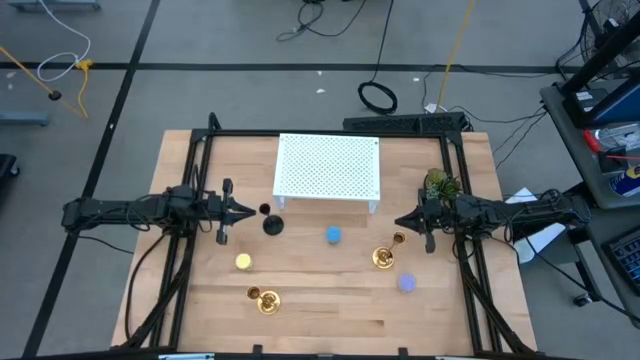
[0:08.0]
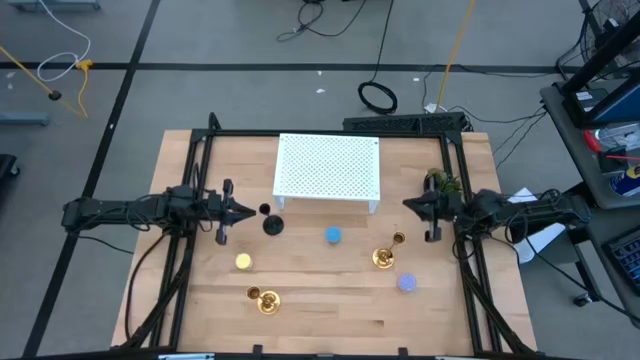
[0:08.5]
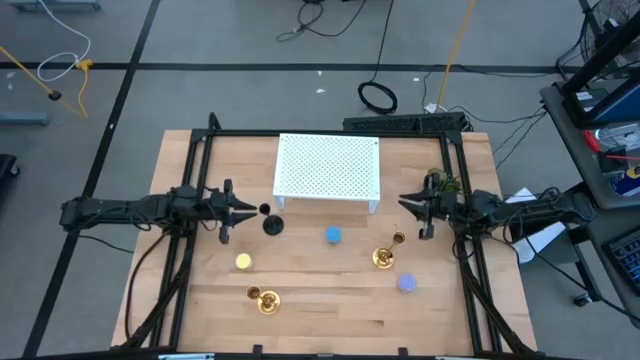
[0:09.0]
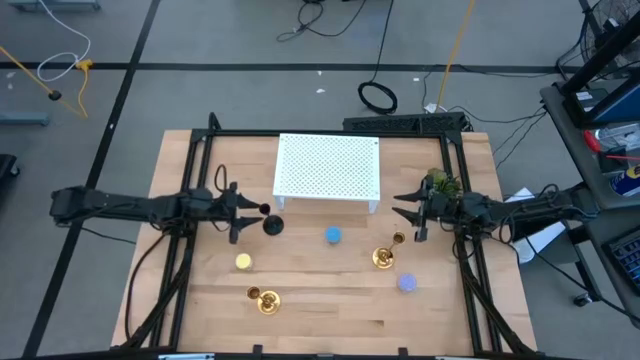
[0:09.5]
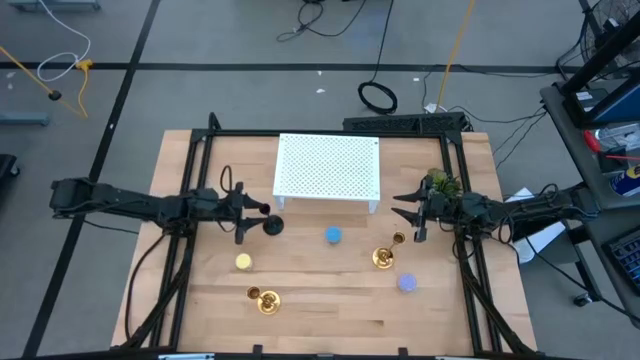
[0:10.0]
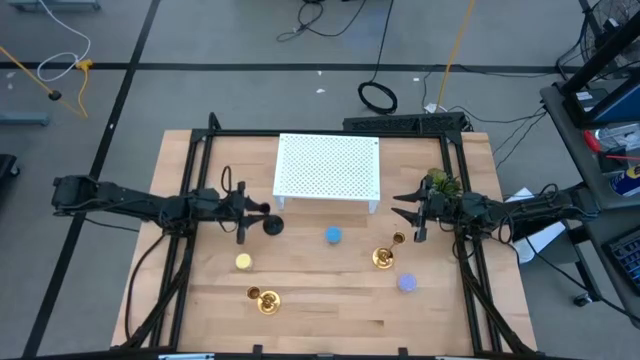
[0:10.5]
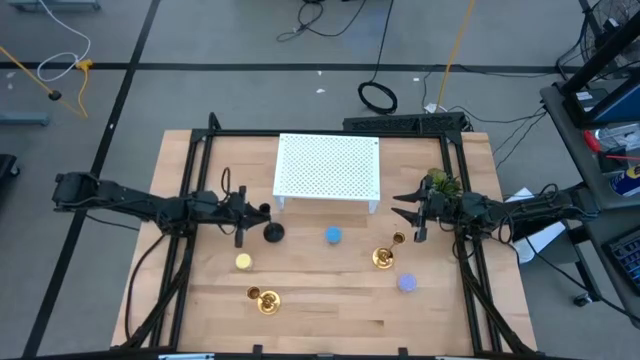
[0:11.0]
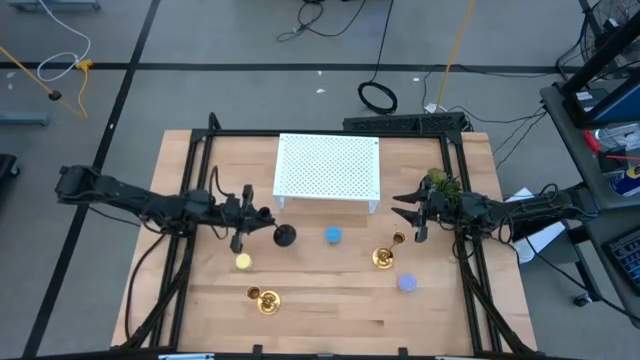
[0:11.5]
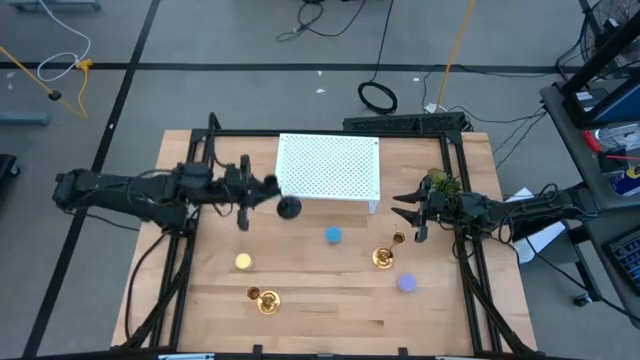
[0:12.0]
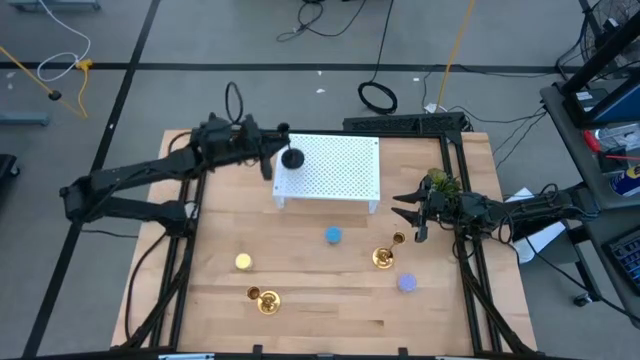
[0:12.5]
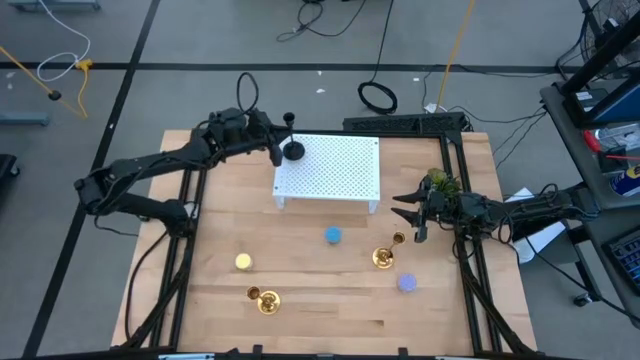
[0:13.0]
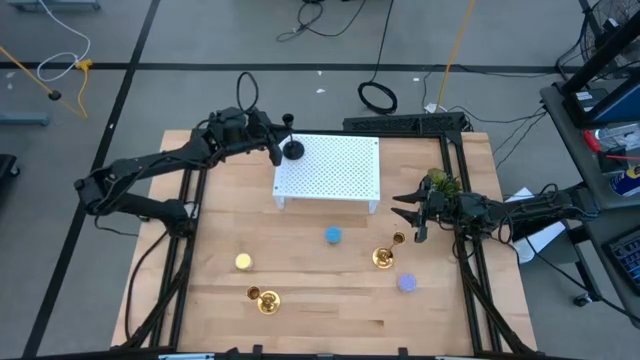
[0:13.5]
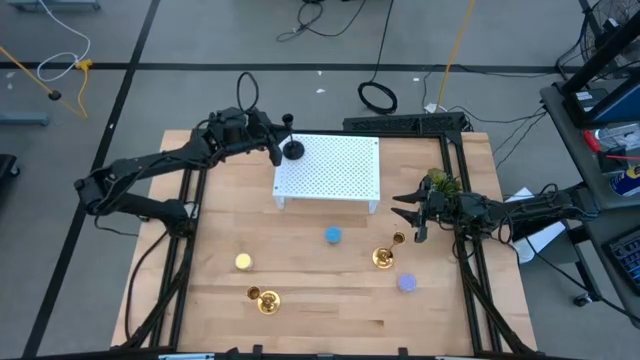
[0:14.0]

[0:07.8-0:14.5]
Task: Pick & Place candle stick holders
Put the black candle holder on the shelf

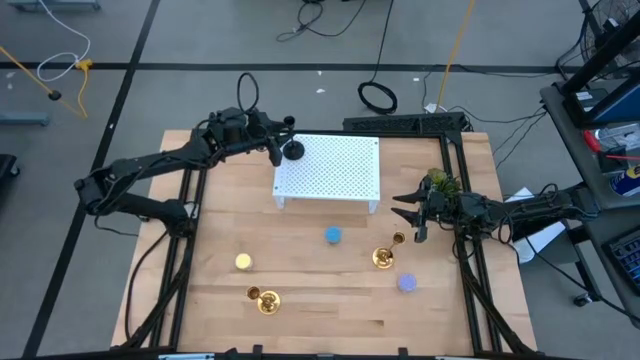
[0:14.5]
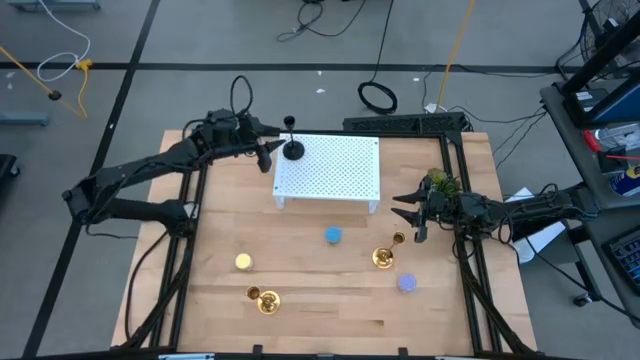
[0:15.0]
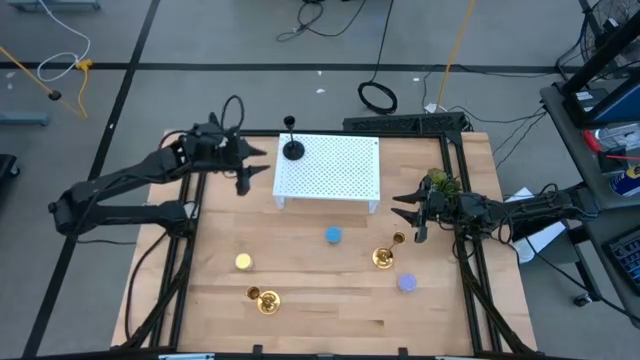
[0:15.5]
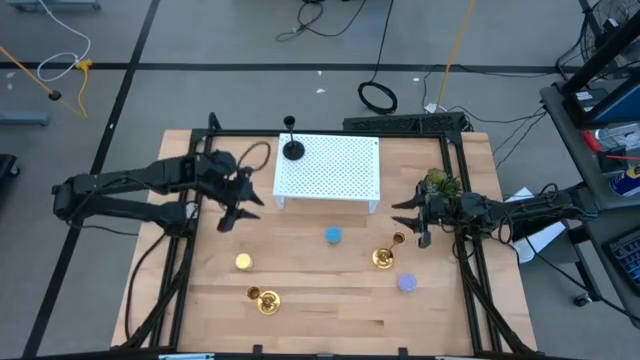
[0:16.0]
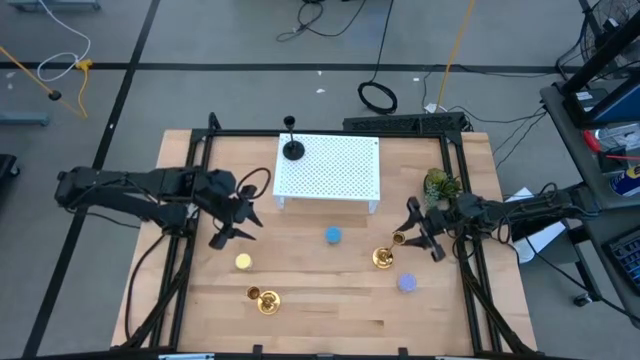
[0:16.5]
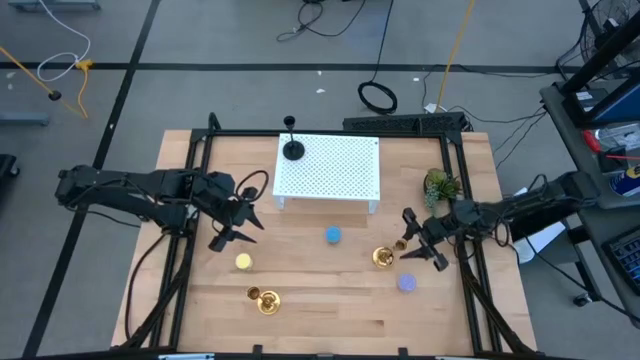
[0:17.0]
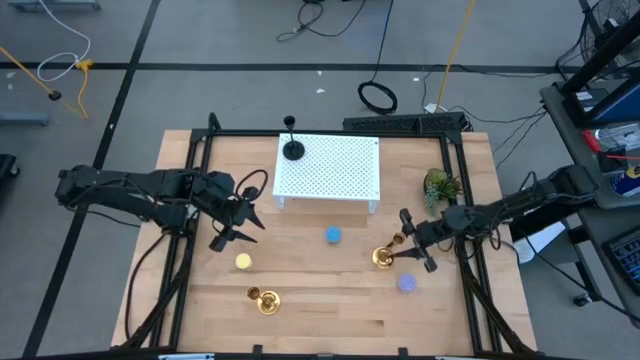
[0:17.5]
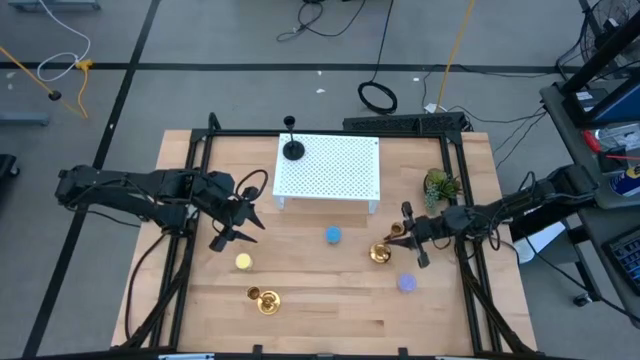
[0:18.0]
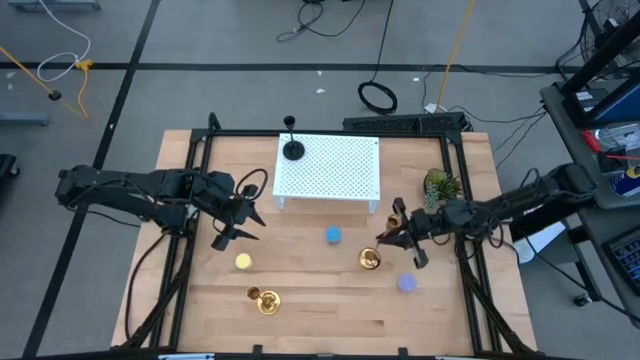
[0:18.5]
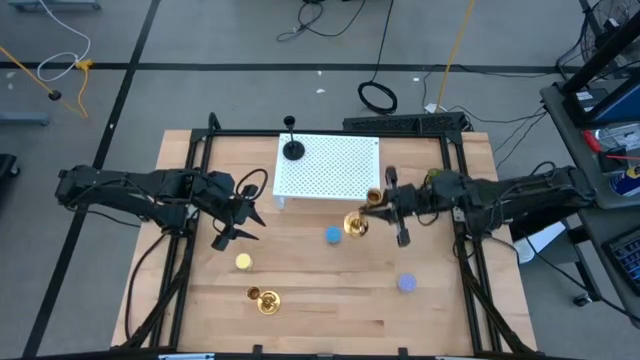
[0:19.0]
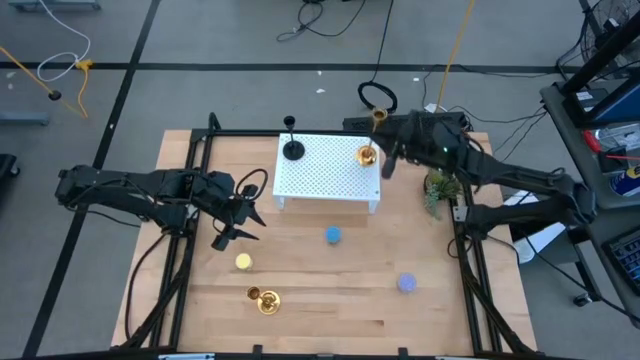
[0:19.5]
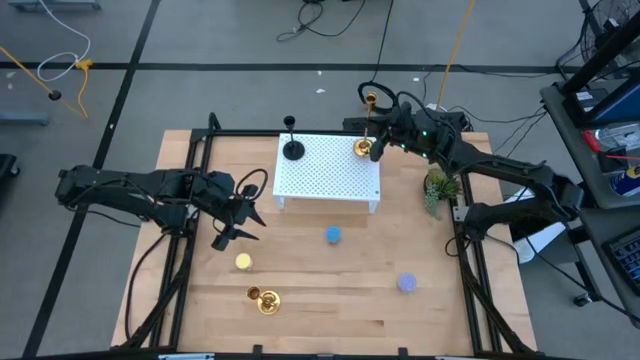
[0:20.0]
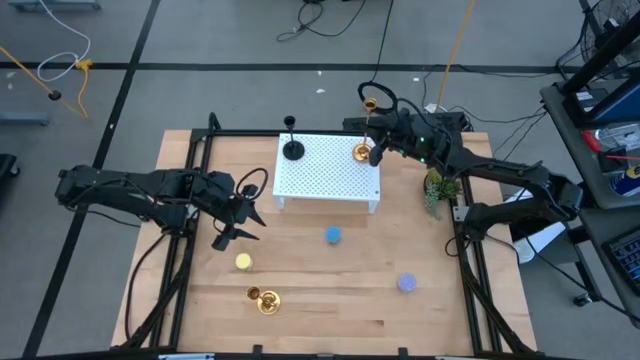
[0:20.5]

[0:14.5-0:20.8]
Put the right gold candle holder on the shelf

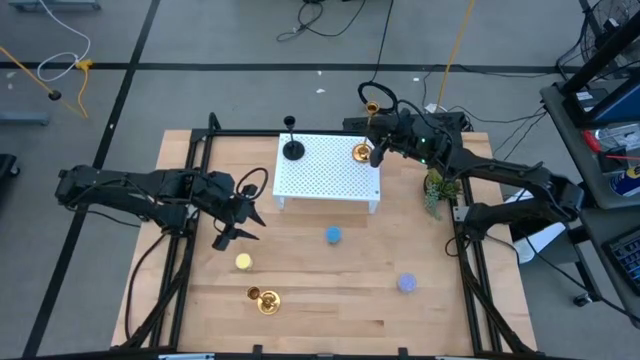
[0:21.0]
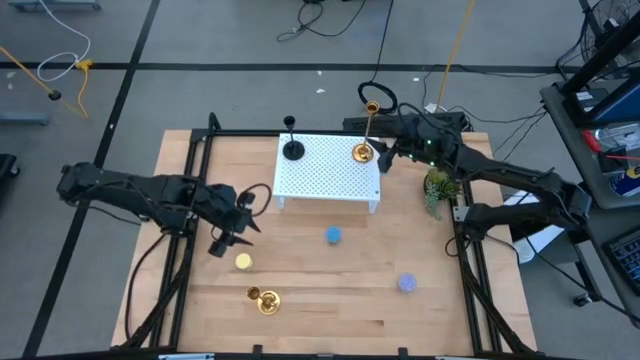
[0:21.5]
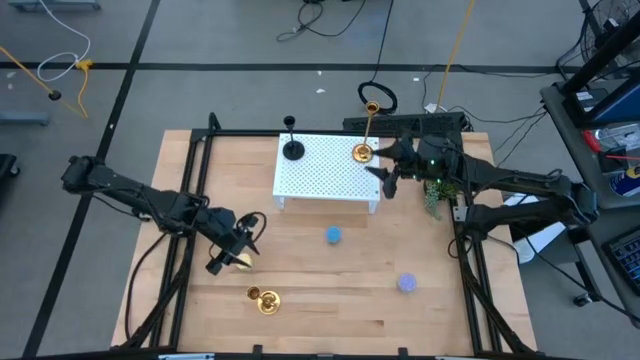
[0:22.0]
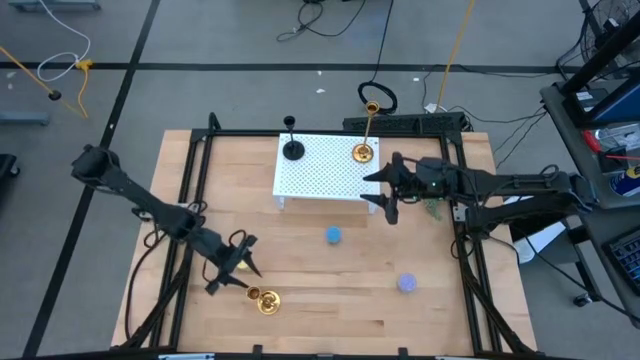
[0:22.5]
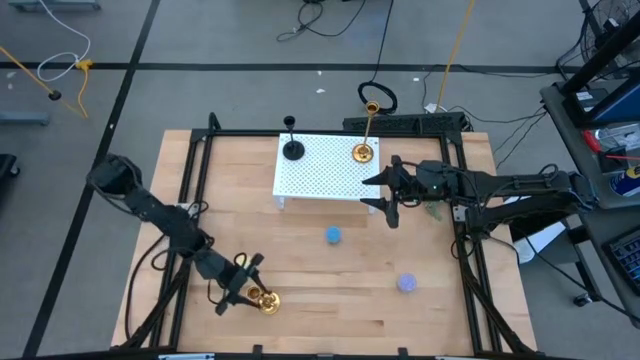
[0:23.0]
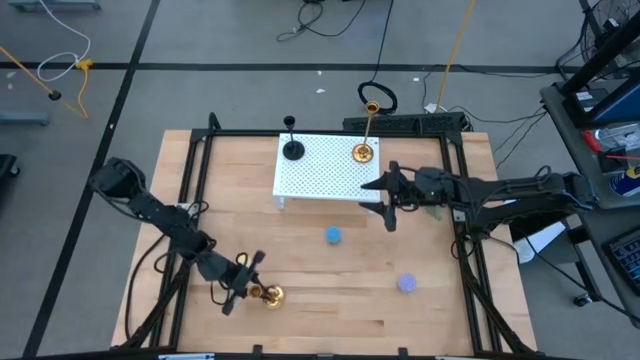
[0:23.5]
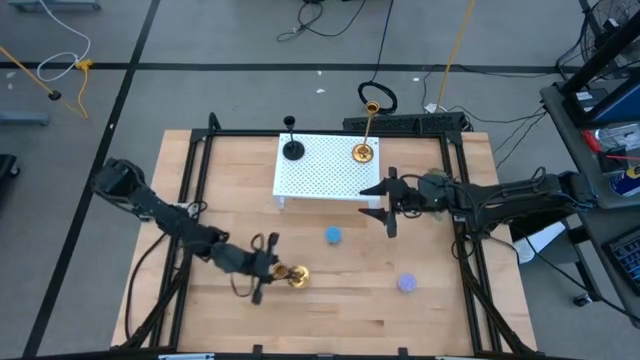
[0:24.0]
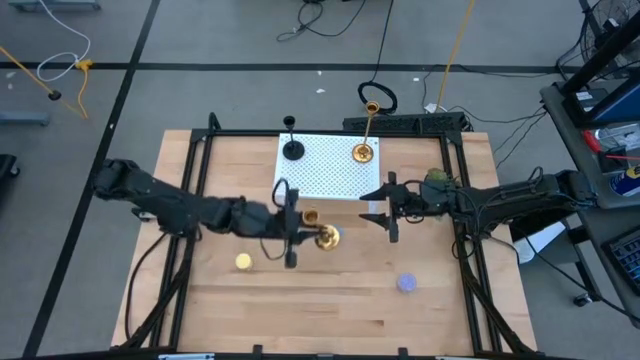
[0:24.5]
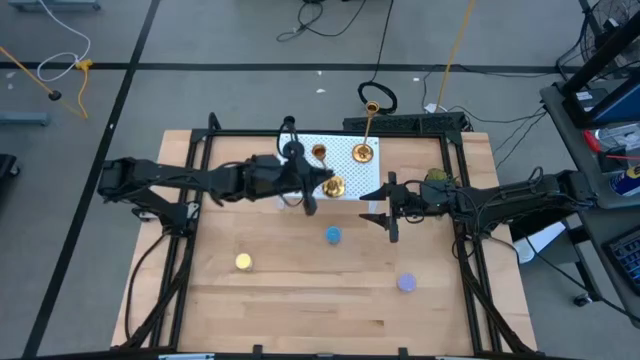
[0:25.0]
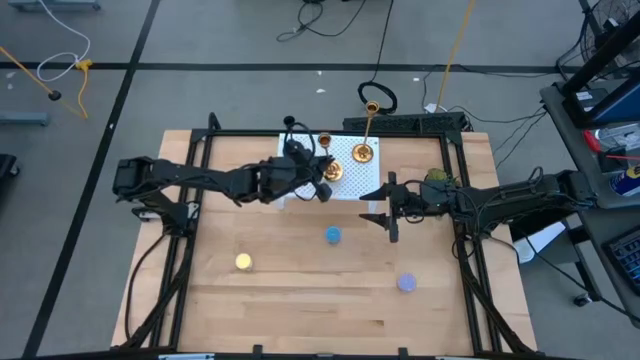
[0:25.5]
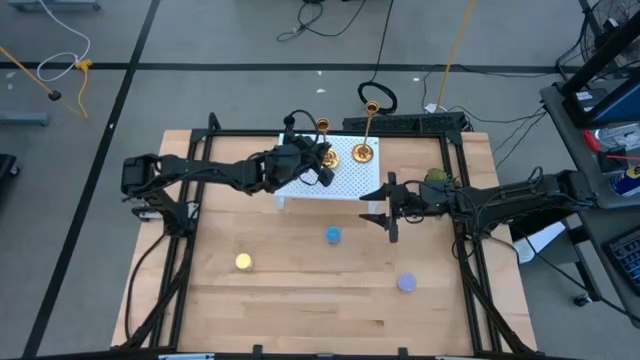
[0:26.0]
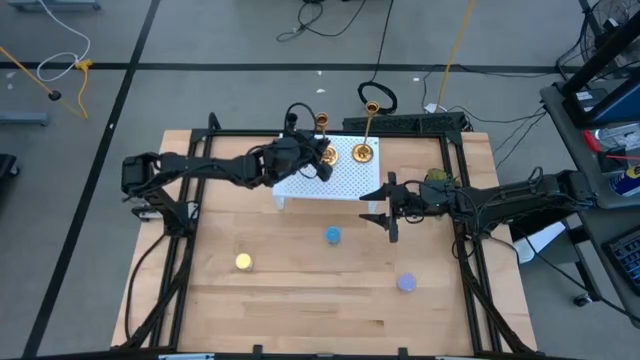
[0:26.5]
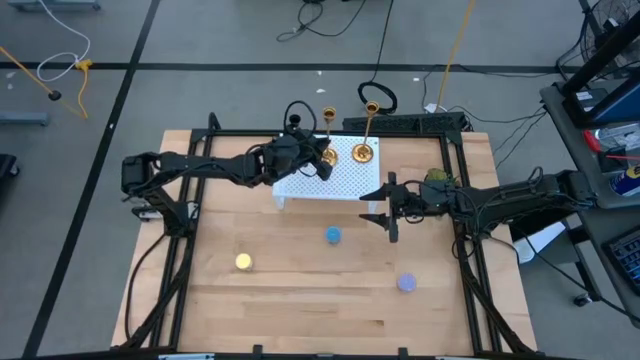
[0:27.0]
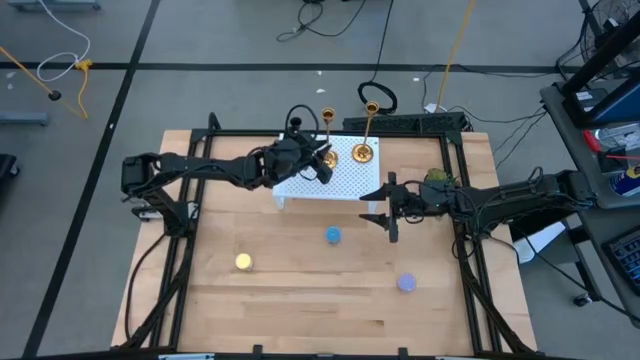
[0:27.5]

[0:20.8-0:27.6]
Put the gold candle holder on the shelf

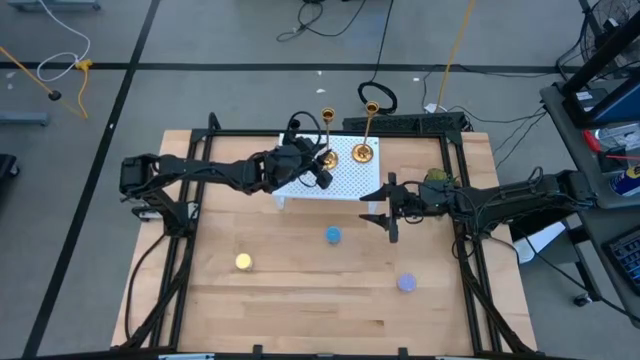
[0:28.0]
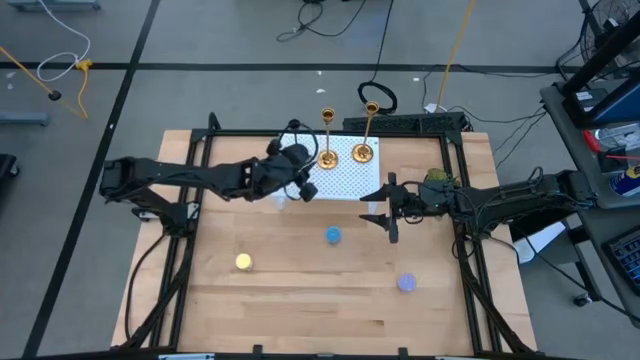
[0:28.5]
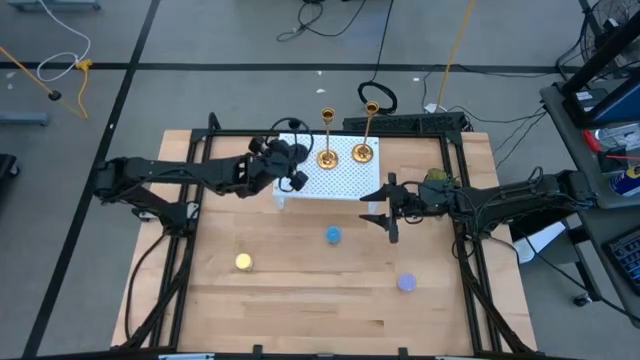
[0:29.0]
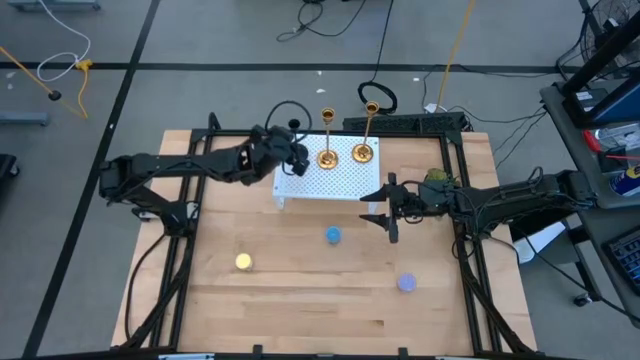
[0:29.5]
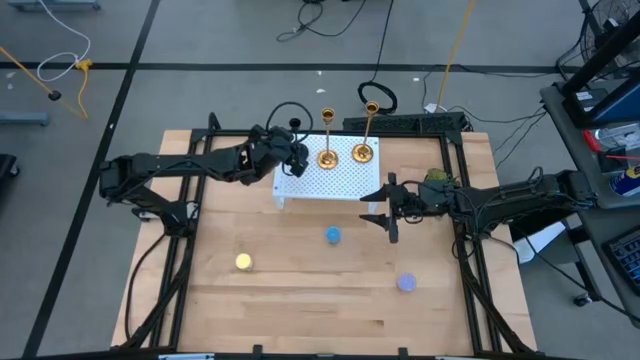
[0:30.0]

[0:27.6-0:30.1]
Adjust the black candle holder on the shelf
